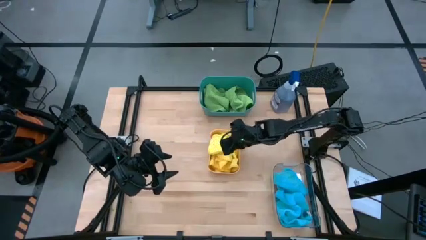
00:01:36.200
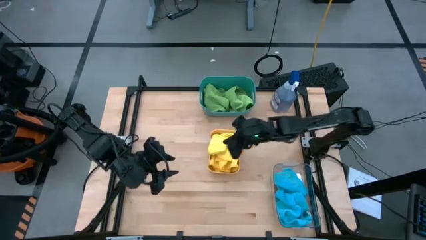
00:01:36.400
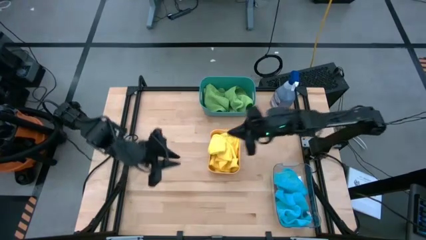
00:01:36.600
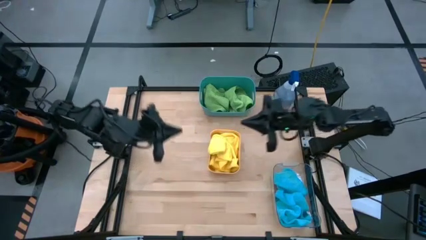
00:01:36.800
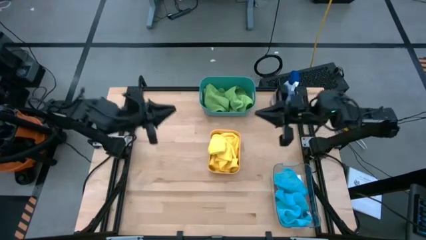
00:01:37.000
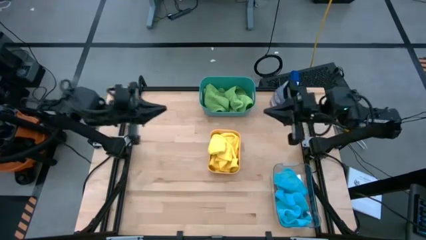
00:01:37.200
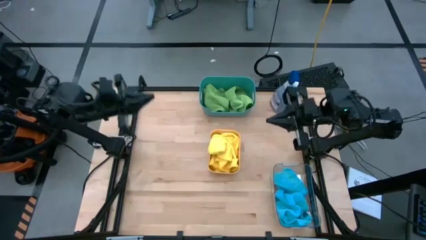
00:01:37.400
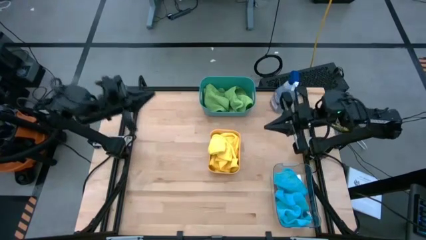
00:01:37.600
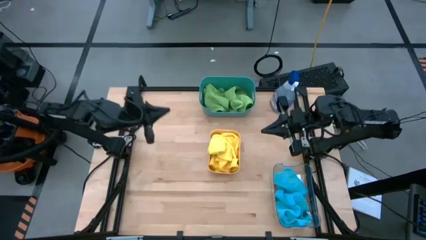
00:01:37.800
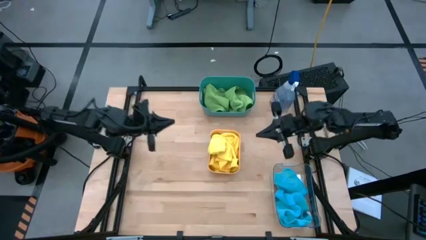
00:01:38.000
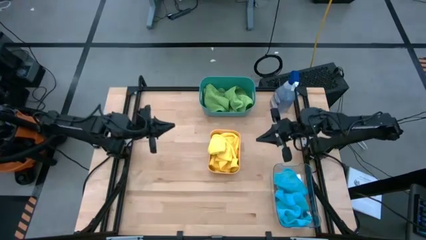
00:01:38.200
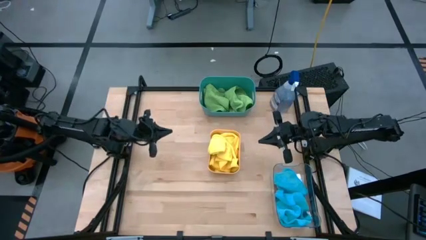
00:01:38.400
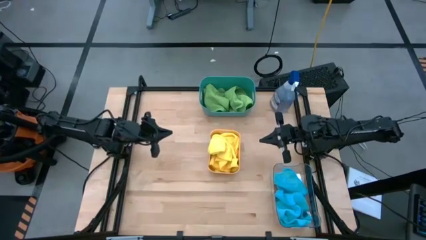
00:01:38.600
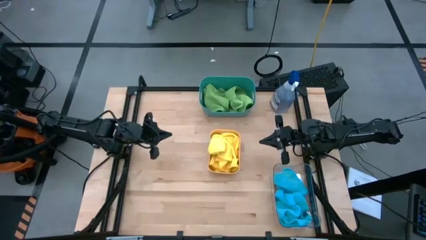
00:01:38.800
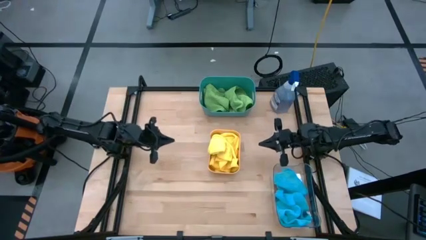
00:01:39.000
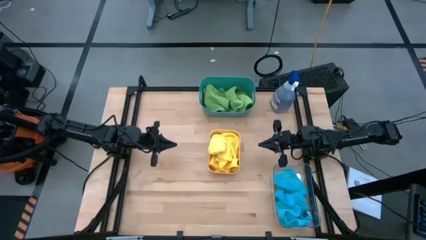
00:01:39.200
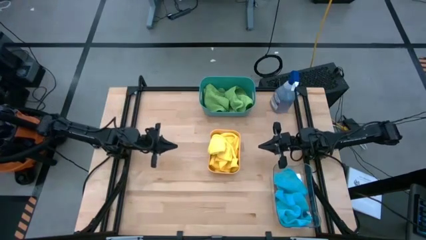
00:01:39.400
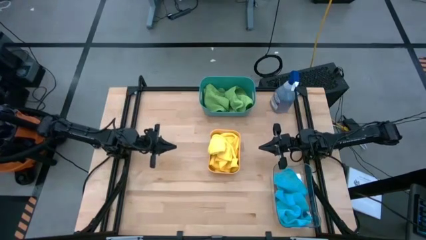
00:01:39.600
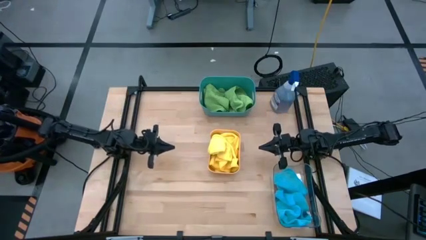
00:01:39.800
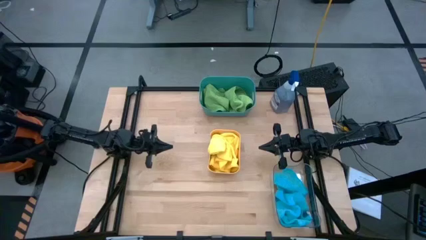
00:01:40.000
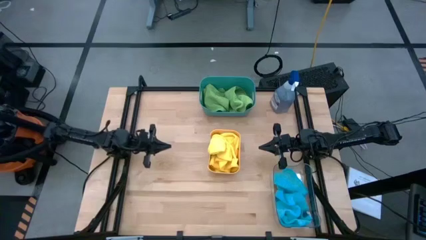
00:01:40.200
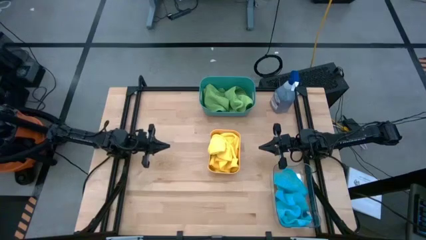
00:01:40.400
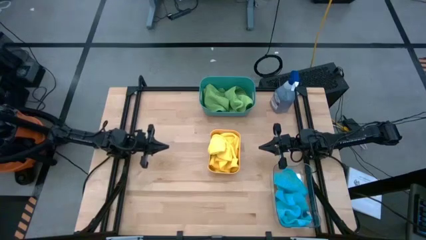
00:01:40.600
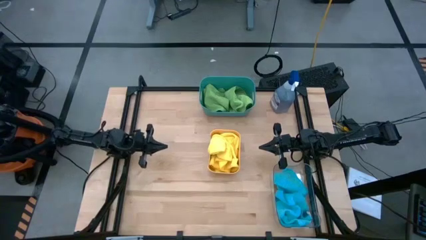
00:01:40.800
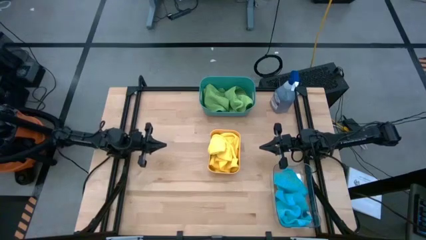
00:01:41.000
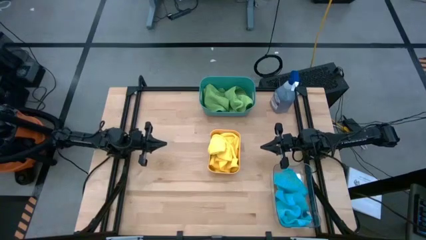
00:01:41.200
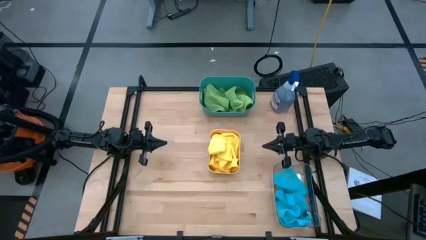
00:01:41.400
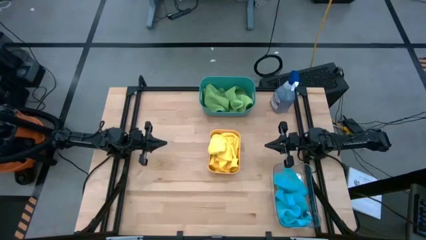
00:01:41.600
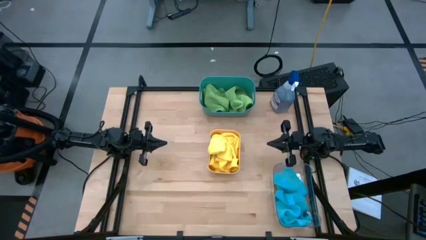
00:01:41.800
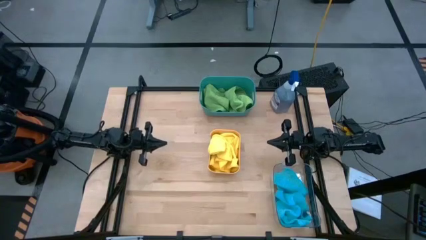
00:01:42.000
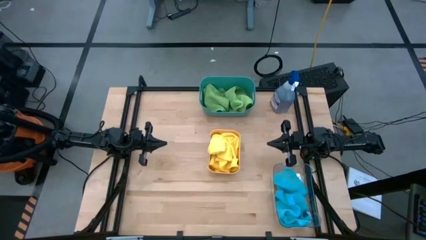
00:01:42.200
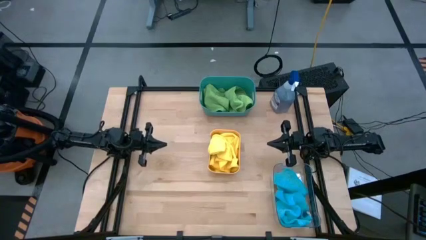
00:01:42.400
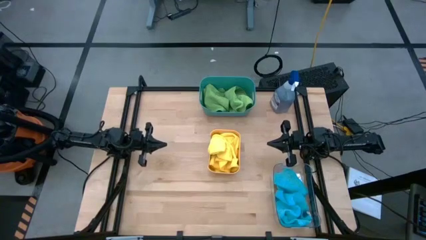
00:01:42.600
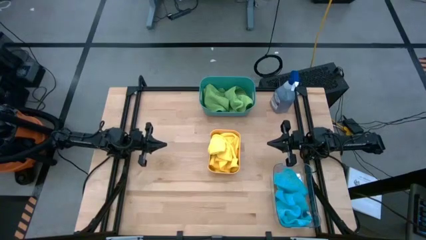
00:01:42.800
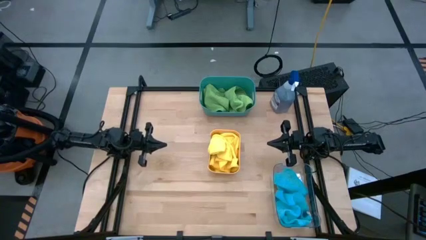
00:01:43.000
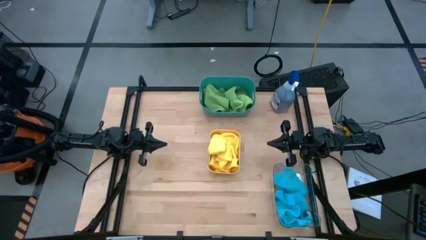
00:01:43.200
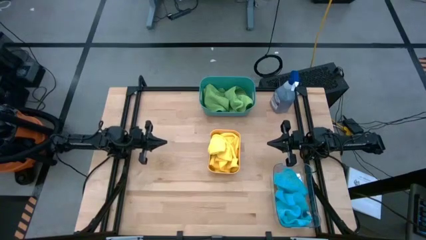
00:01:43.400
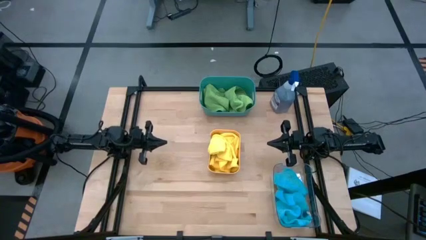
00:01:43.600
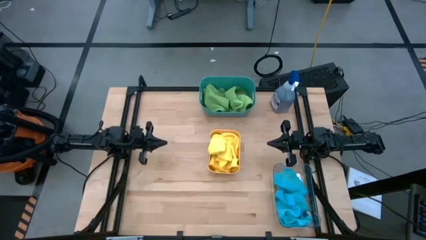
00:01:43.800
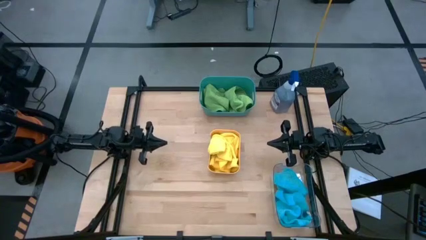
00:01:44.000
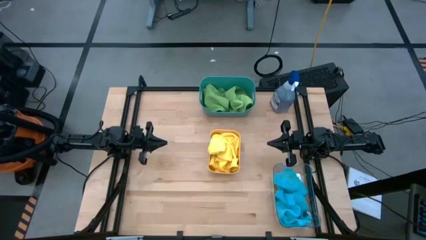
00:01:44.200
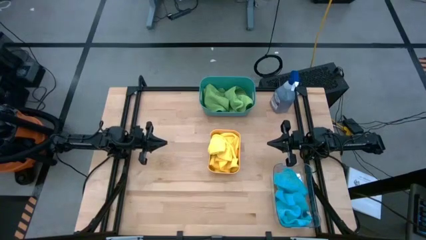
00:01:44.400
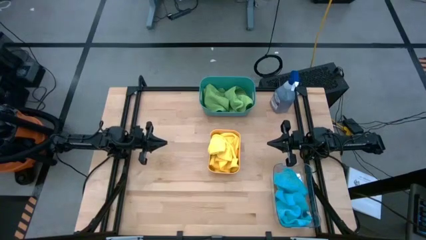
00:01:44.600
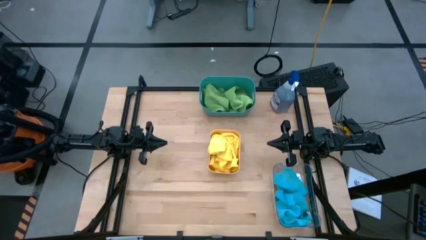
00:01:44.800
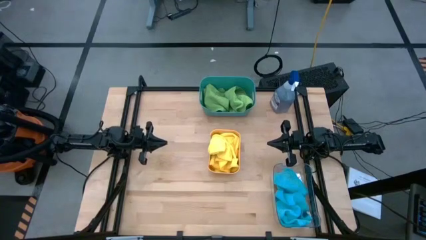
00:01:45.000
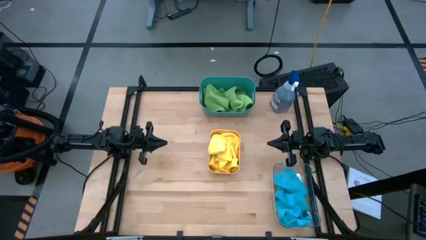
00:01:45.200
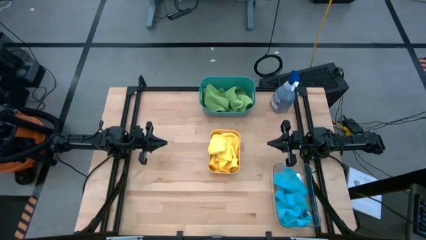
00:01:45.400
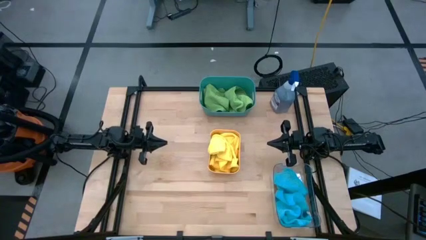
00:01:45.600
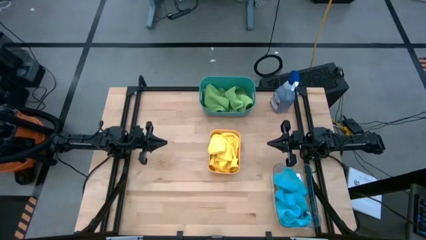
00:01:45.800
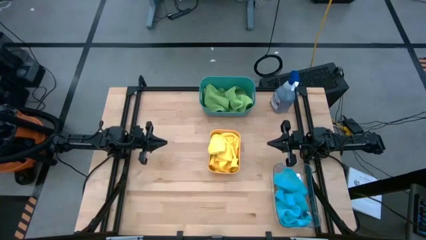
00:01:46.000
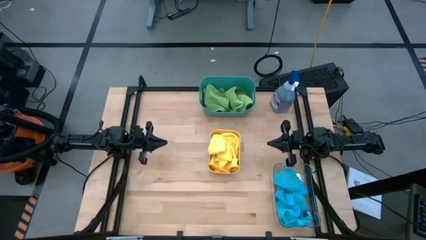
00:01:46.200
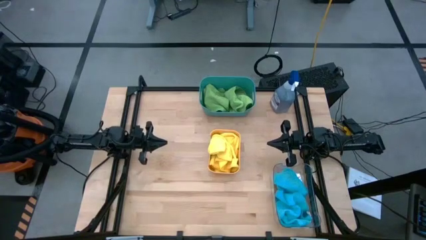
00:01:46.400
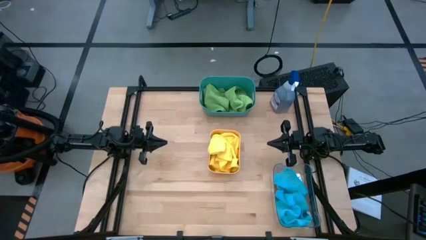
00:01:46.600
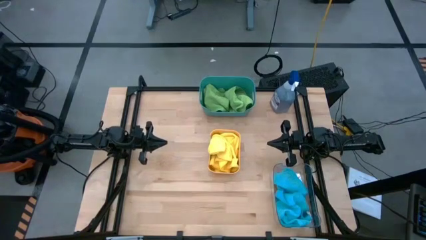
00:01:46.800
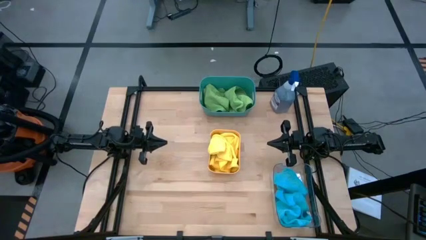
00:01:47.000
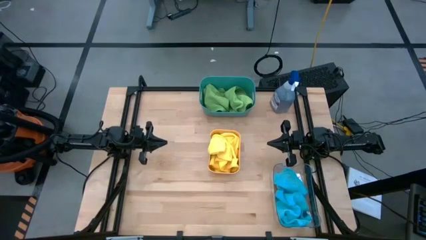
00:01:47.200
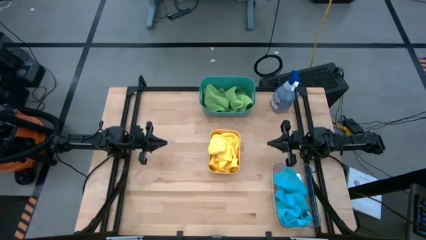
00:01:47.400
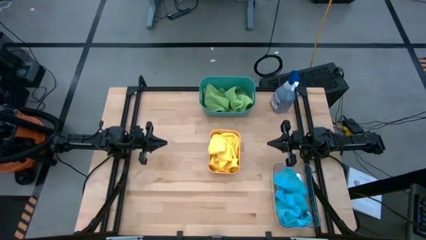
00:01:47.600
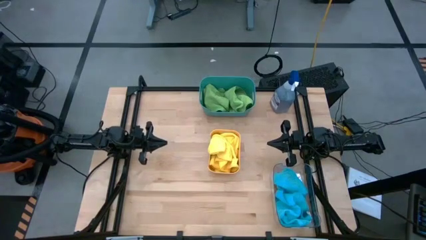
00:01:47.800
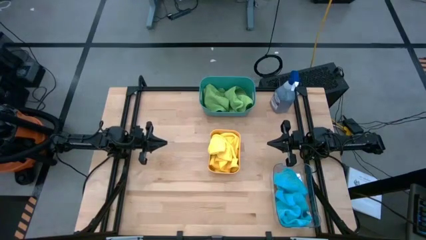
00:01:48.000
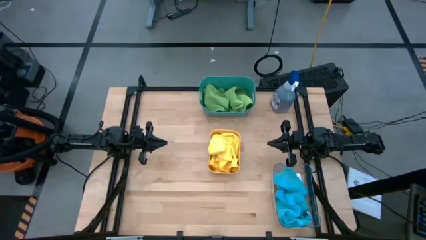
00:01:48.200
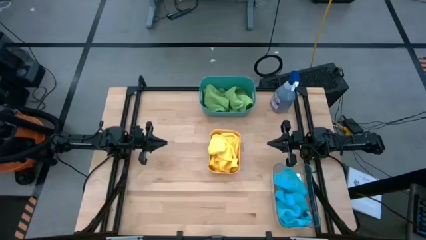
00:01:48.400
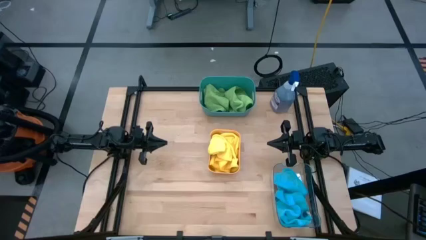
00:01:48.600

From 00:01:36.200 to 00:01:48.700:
Task: Sort microfiber towel by color & place in baskets
Return to Home Position

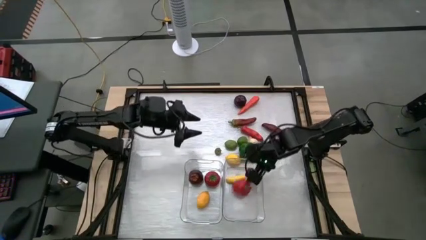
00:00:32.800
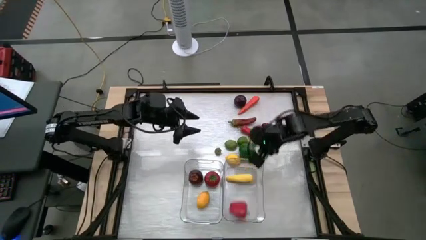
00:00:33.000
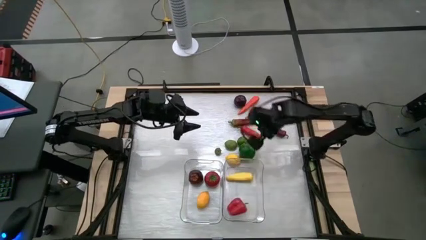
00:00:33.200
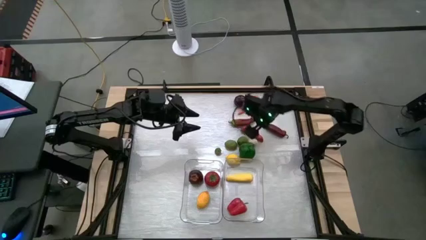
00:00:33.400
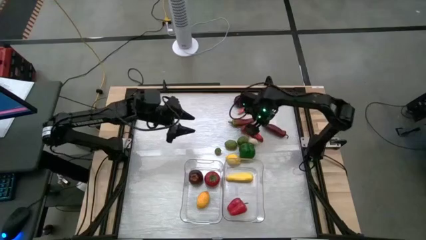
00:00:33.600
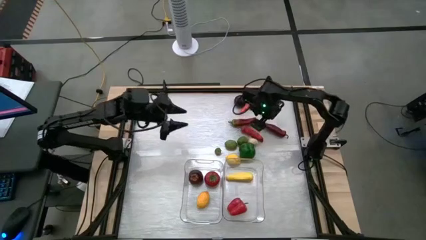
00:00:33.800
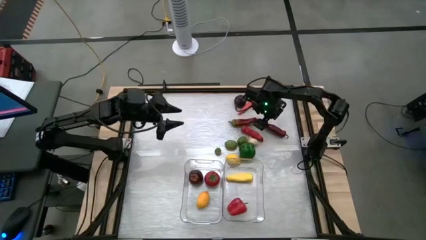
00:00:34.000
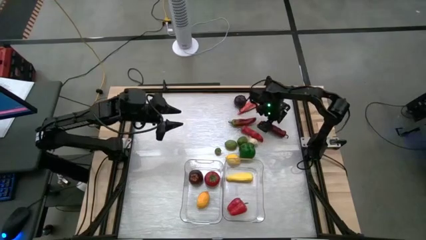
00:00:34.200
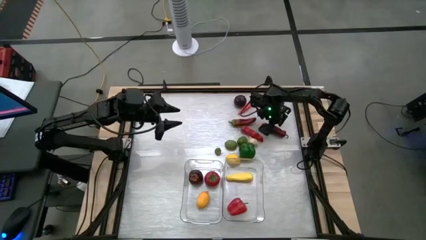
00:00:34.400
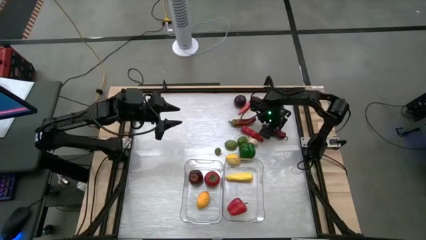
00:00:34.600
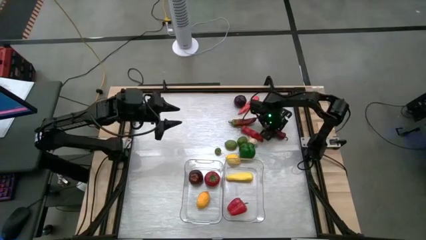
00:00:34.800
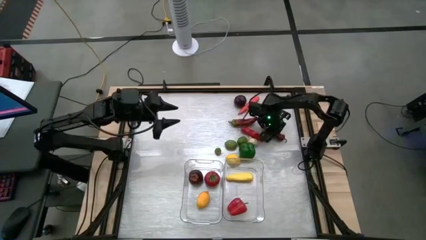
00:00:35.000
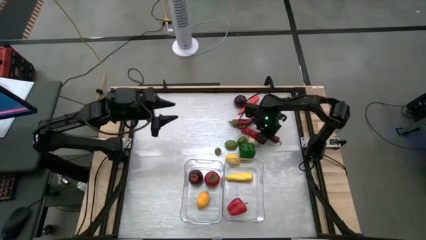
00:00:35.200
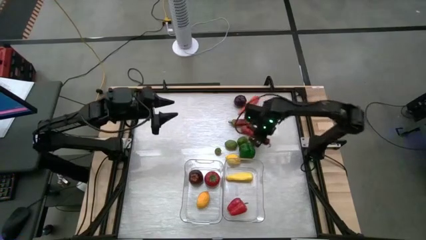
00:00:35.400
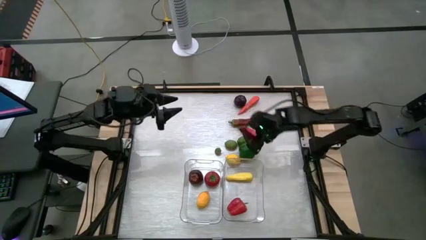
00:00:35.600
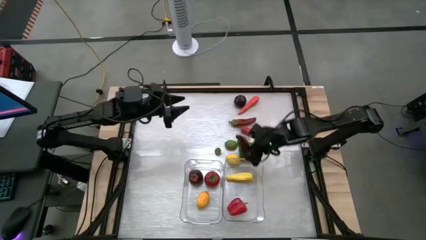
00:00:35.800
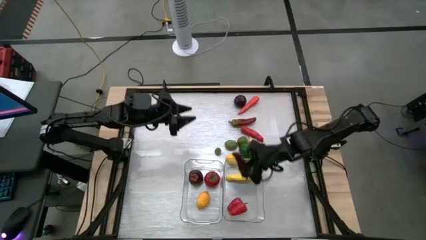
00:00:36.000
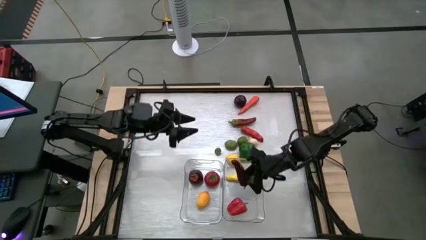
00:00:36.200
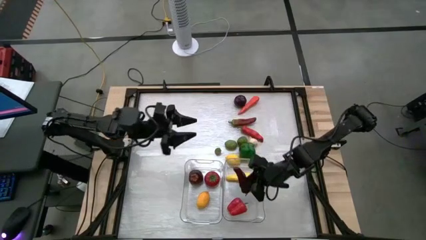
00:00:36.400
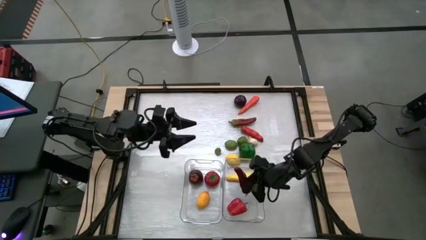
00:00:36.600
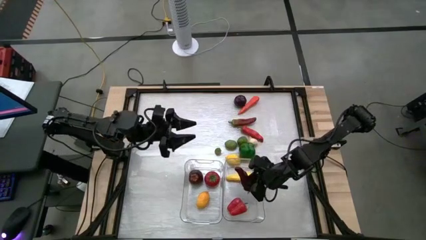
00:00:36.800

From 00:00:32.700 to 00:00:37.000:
Task: Sort produce into baskets
Put the left dark red chili pepper into the right transparent bin
